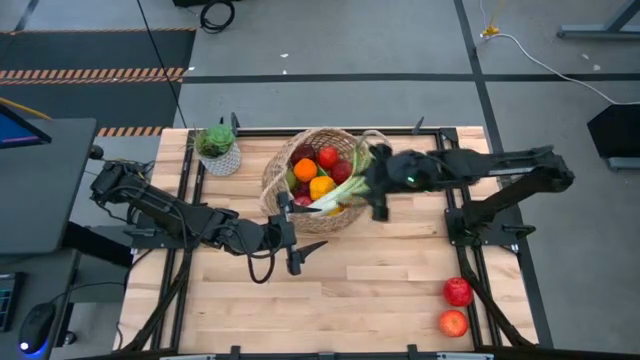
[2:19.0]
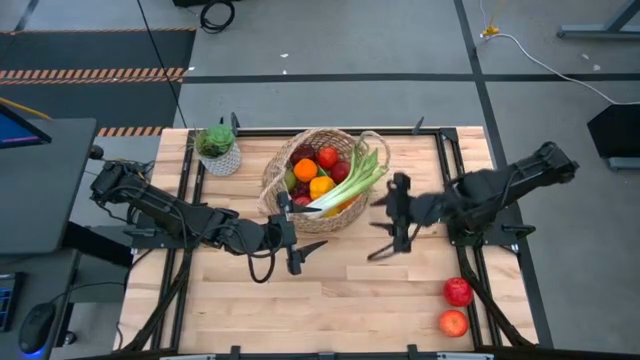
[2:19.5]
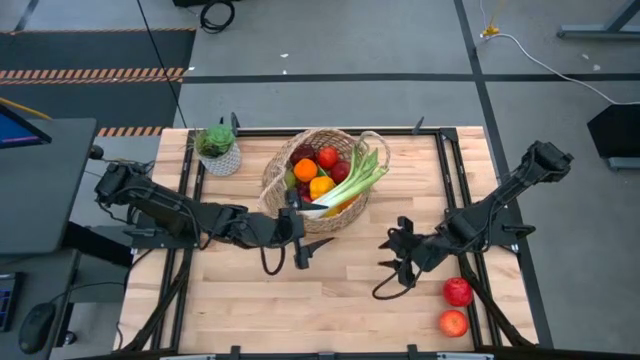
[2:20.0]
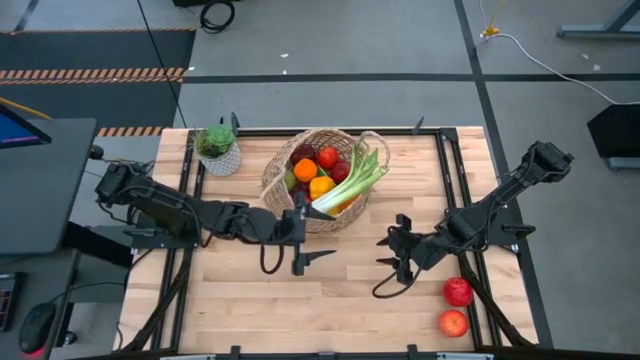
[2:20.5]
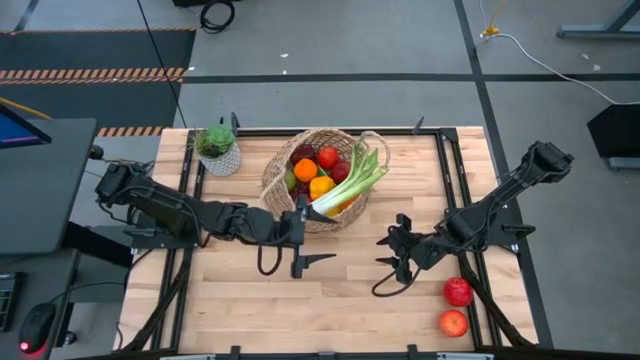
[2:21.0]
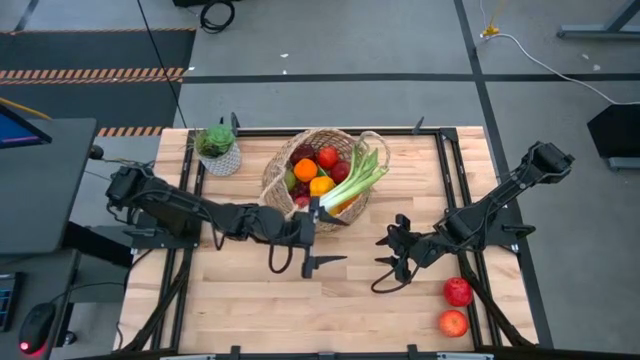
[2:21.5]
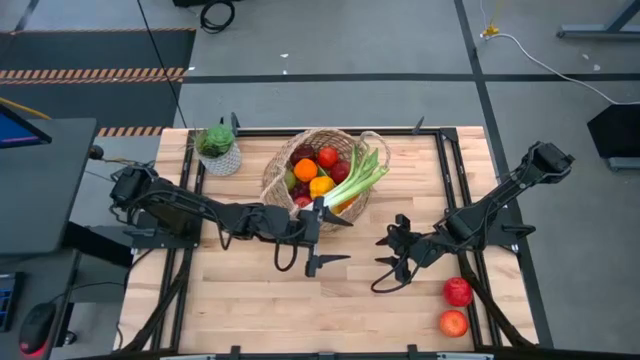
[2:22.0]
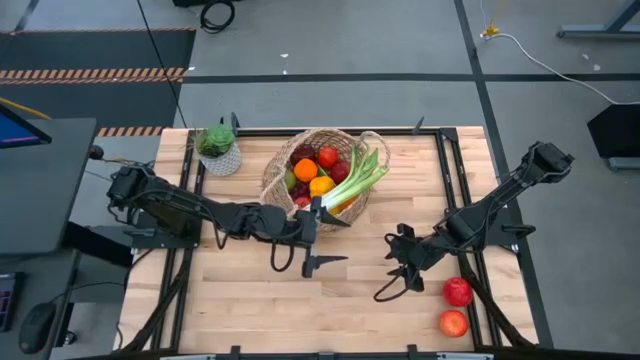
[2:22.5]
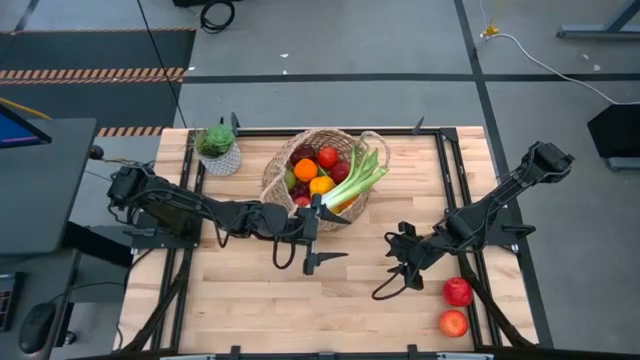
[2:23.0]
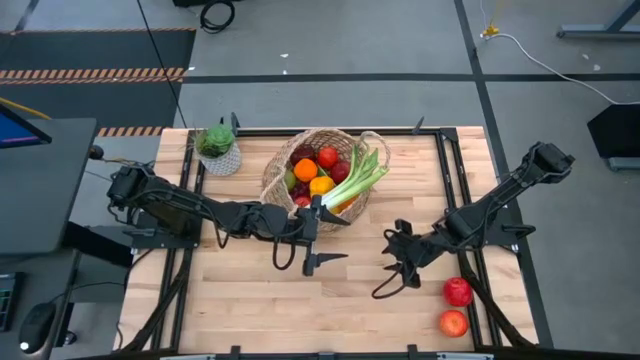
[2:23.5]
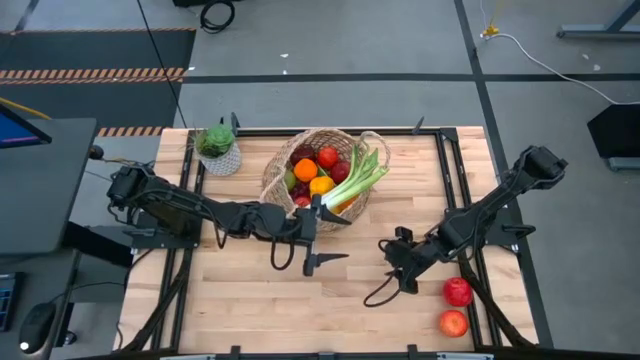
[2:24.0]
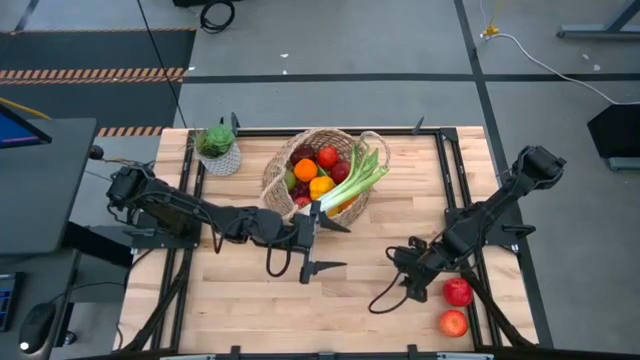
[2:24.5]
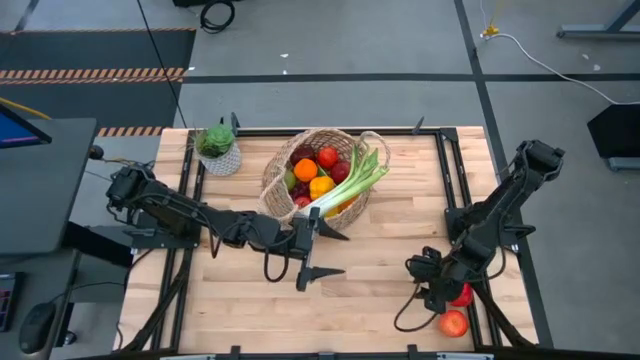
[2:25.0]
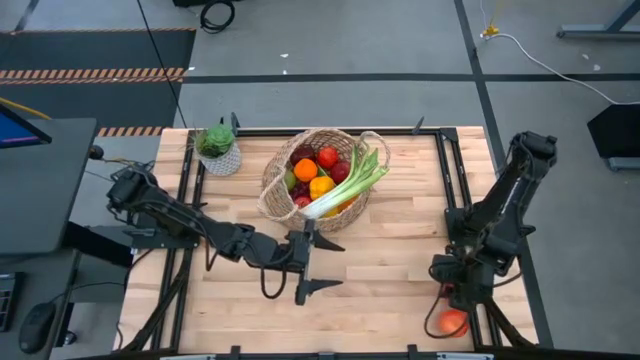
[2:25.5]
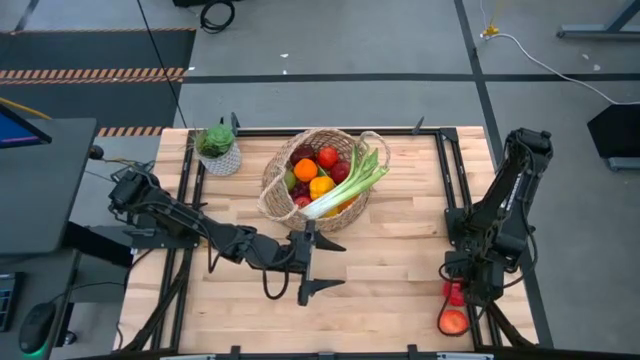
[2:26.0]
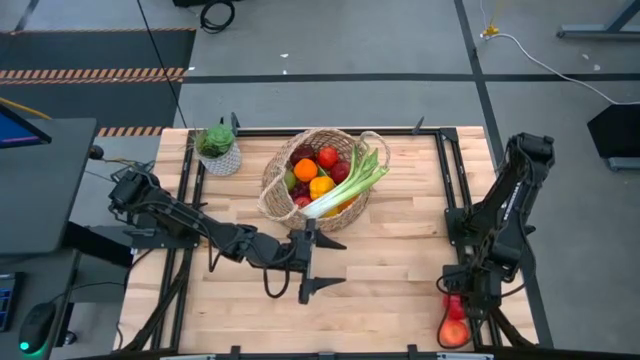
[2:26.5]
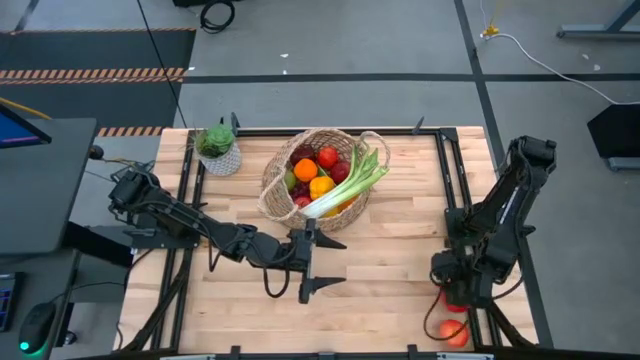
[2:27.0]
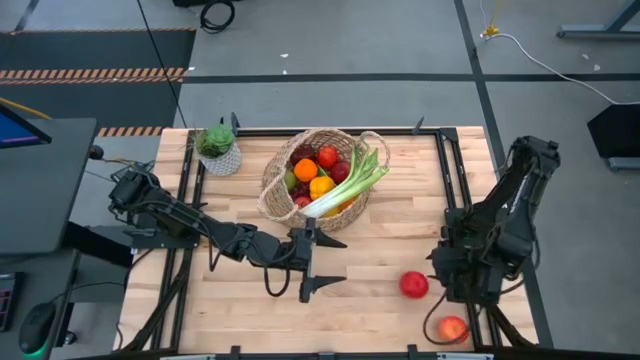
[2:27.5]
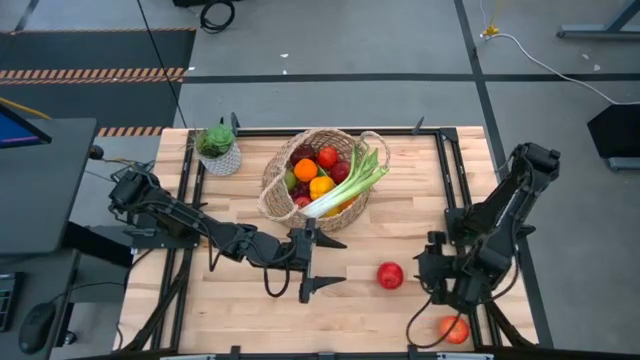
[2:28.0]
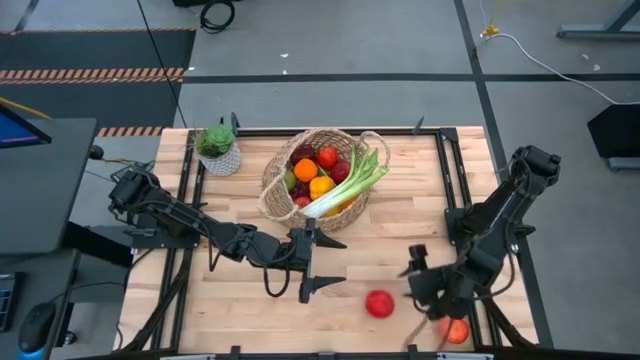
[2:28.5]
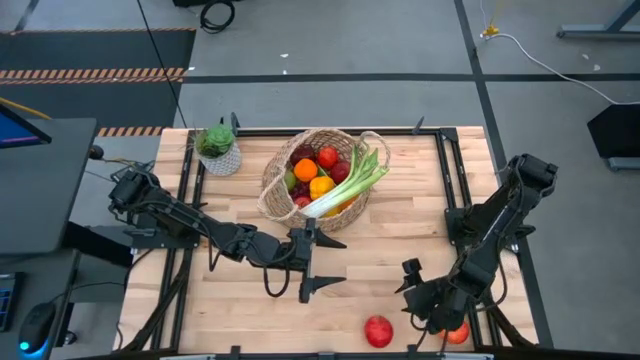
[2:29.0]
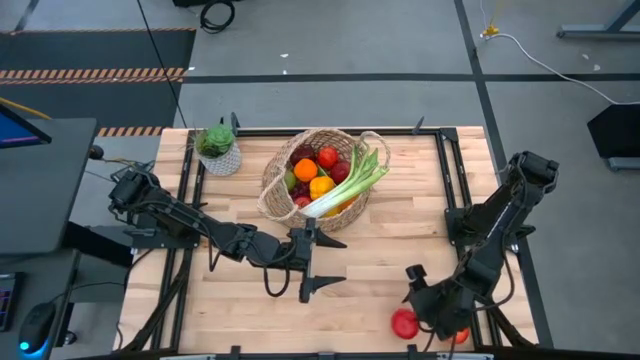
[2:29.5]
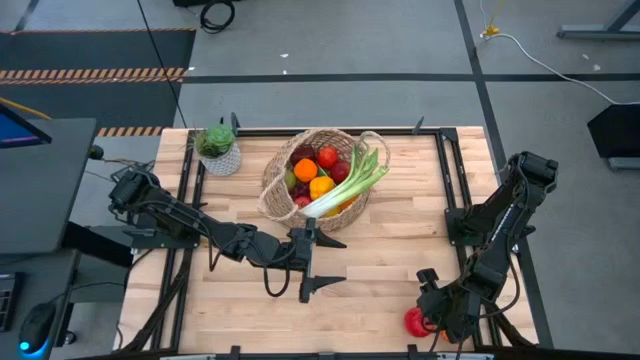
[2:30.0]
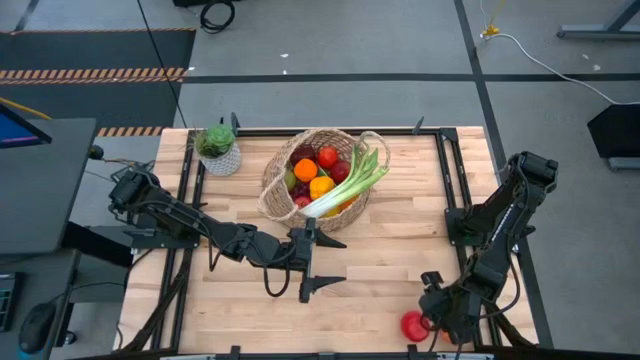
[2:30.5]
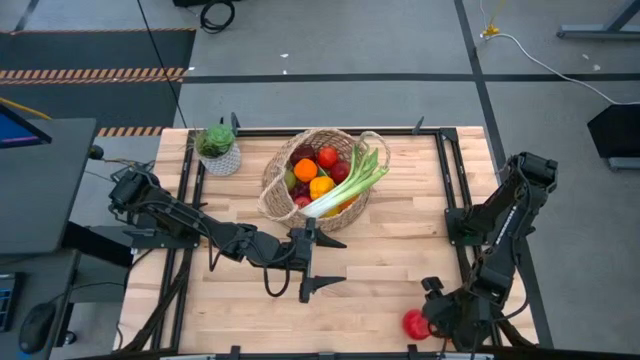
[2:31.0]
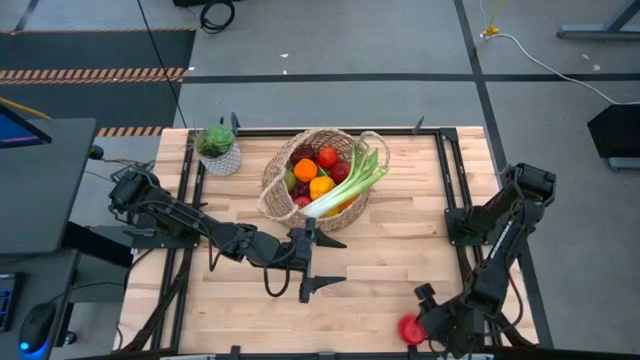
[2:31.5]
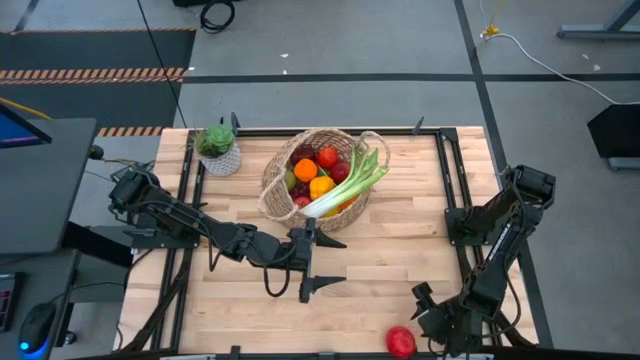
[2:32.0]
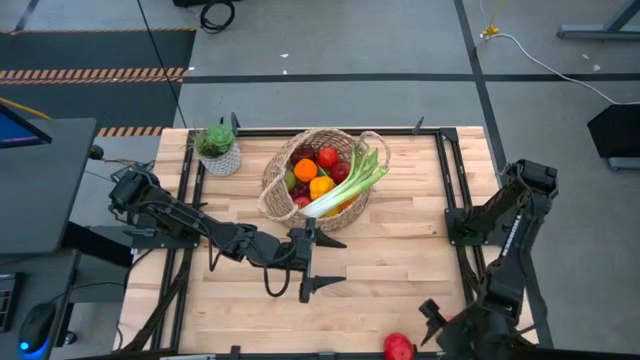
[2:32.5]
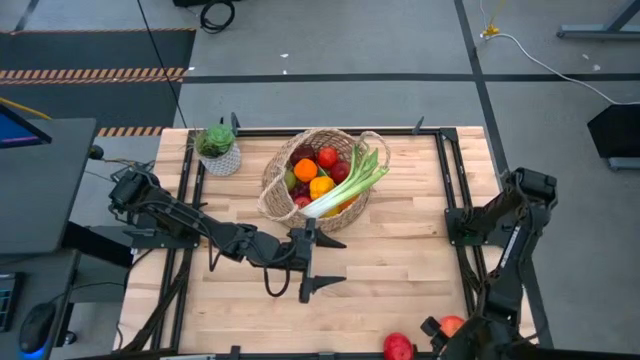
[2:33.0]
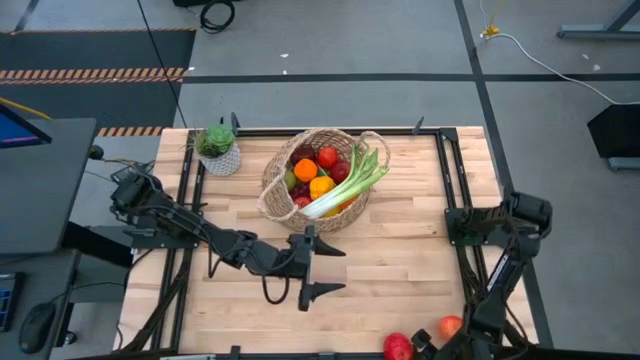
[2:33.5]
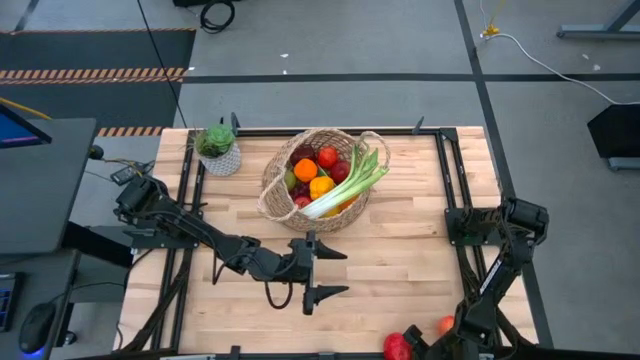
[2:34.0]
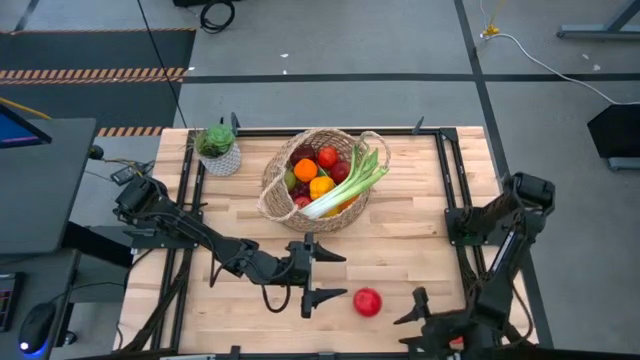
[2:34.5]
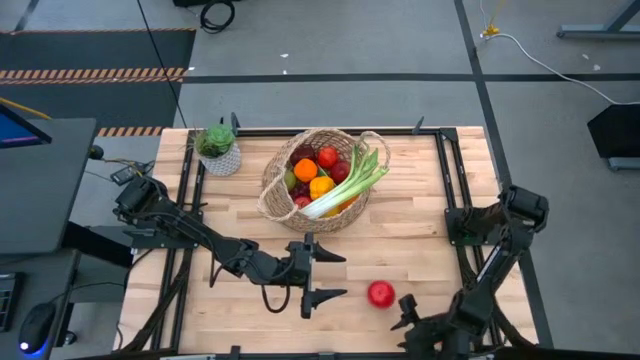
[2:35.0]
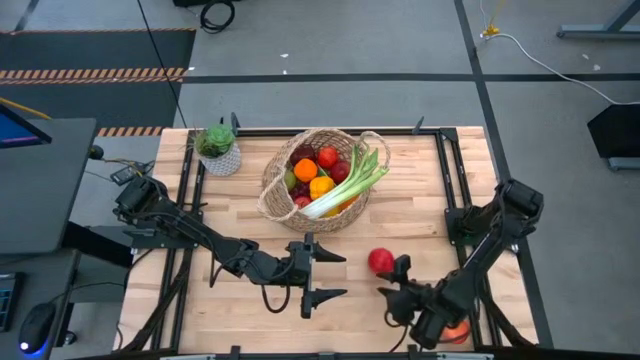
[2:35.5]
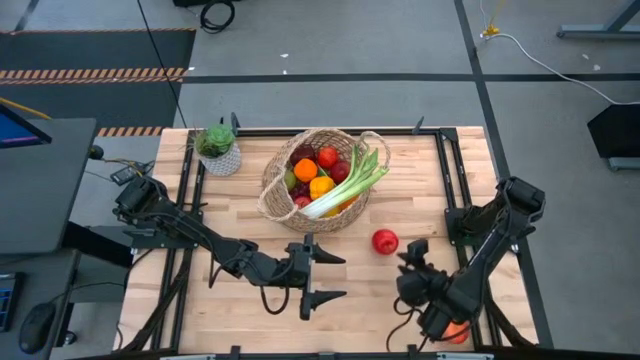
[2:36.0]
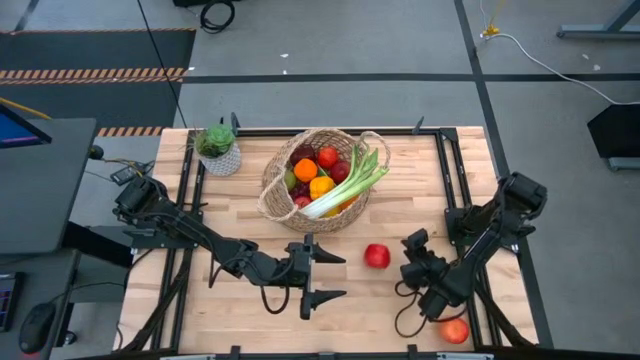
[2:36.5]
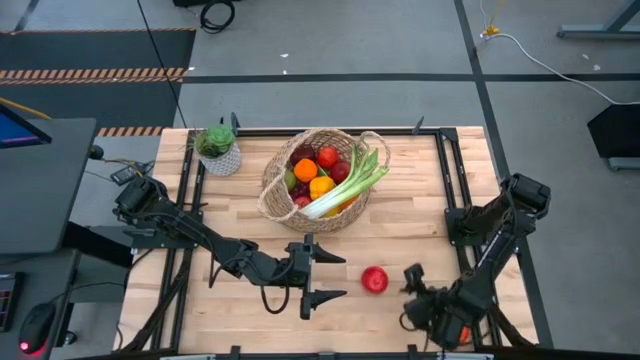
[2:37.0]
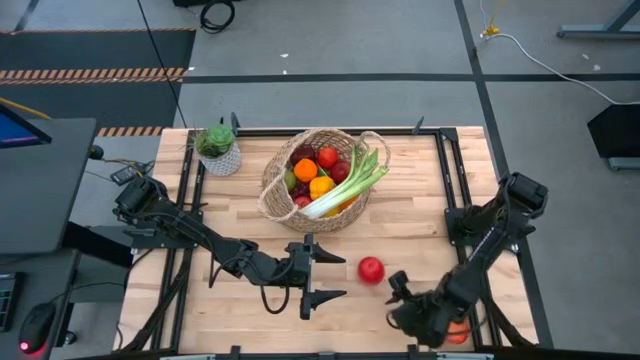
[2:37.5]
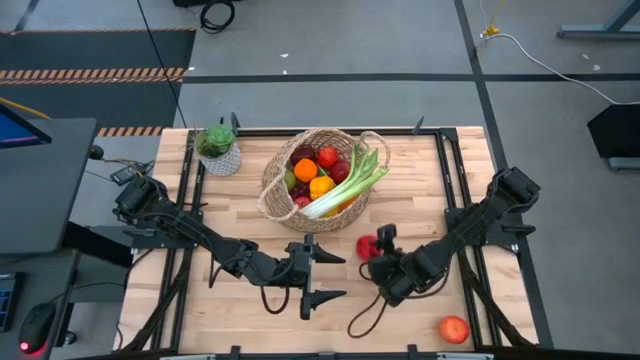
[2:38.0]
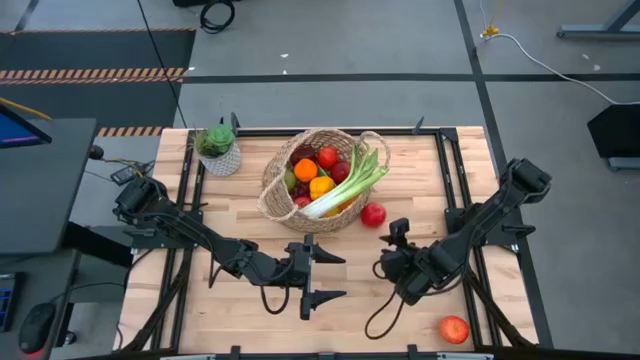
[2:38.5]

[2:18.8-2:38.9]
Task: Build produce basket
Put the apple into the basket

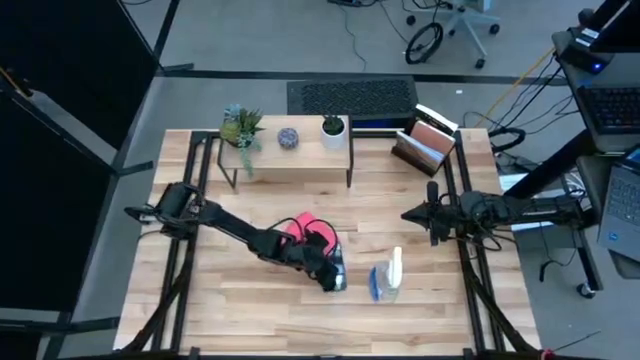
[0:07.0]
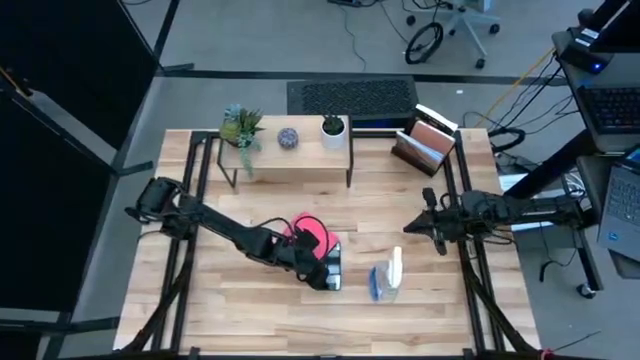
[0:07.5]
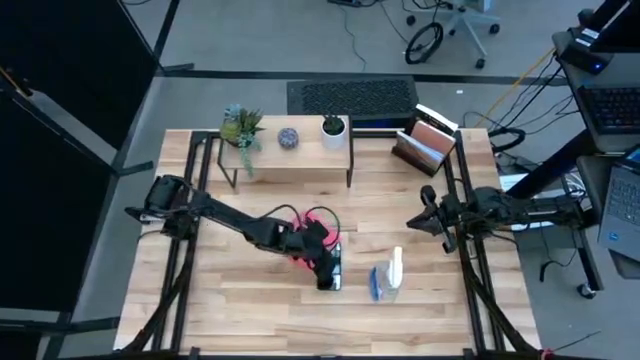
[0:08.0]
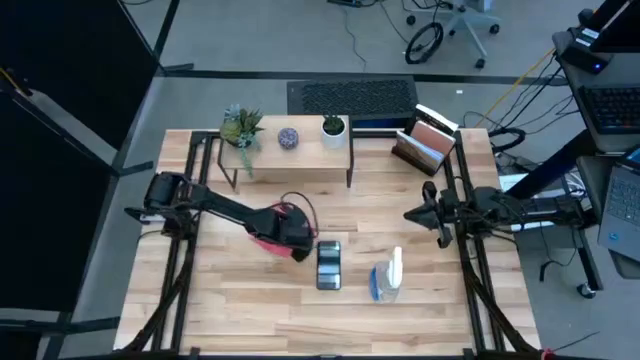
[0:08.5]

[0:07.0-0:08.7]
Task: Apply microfiber cloth
Adjust the pink microfiber cloth
